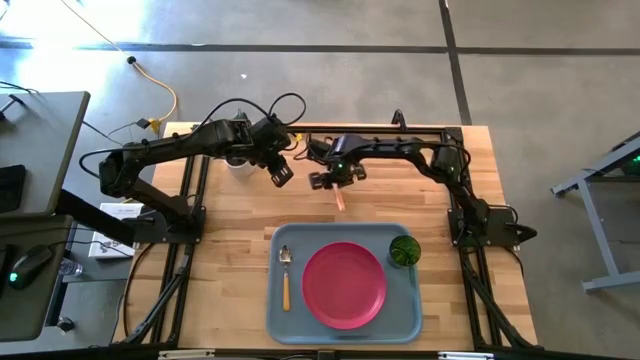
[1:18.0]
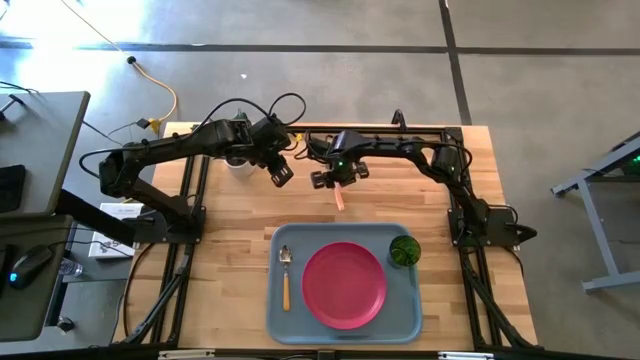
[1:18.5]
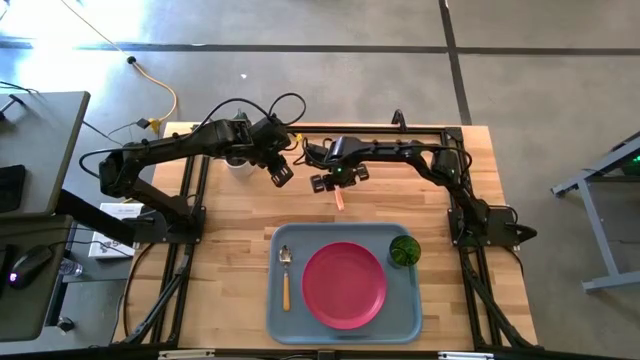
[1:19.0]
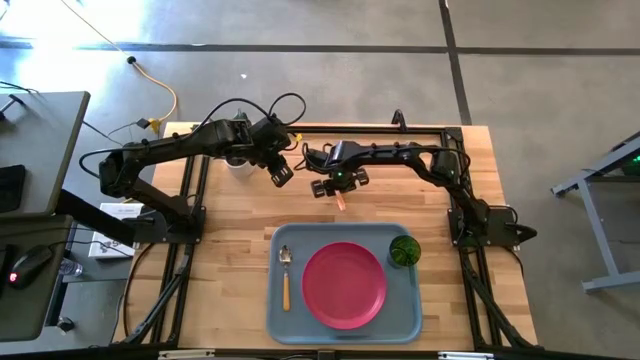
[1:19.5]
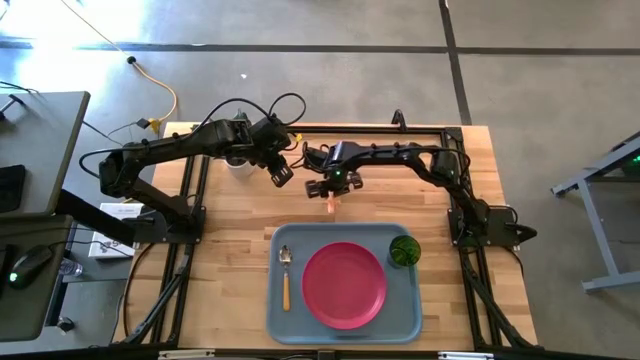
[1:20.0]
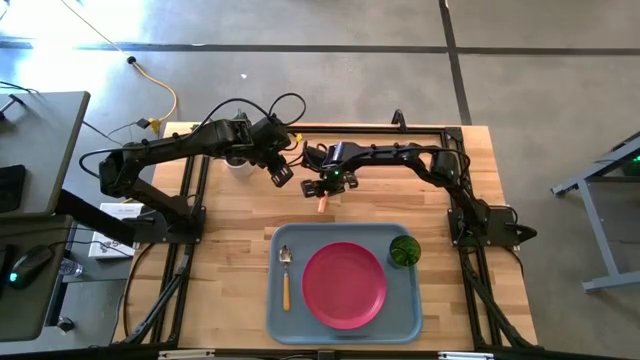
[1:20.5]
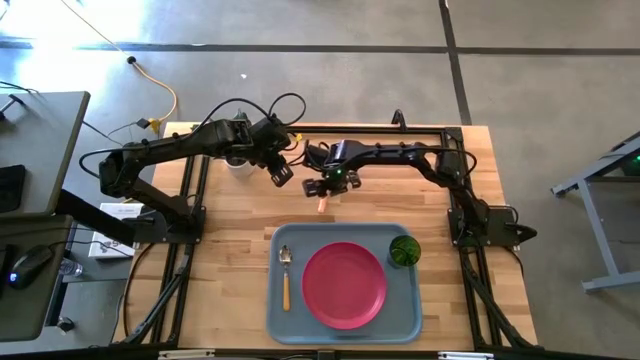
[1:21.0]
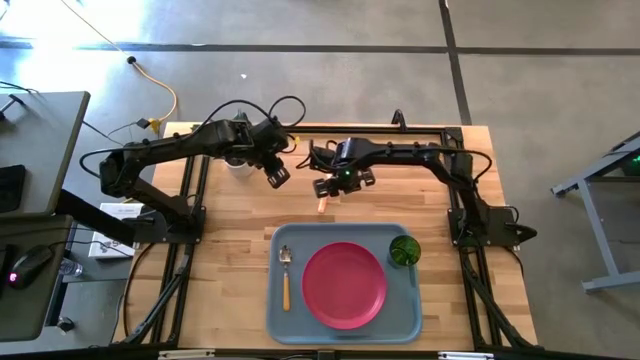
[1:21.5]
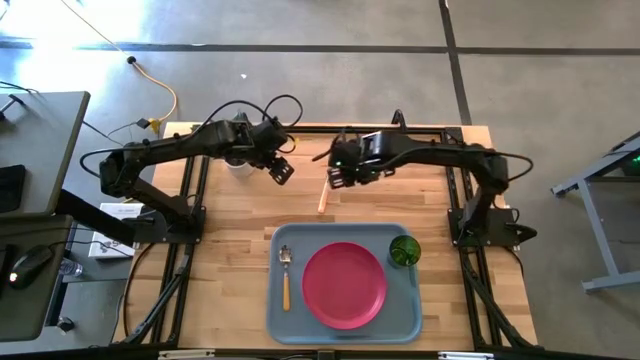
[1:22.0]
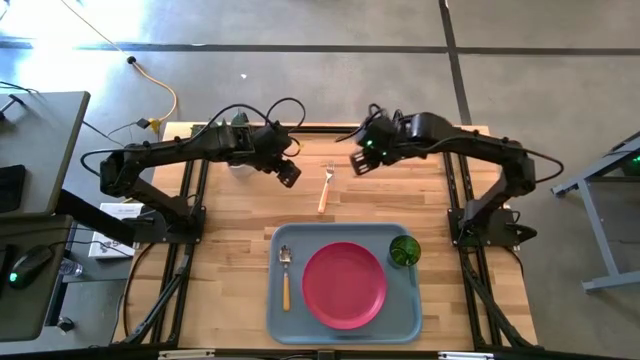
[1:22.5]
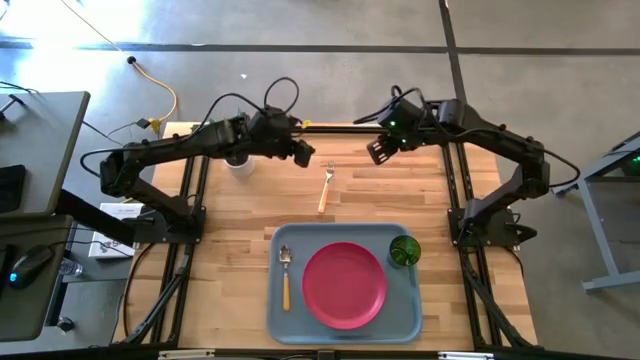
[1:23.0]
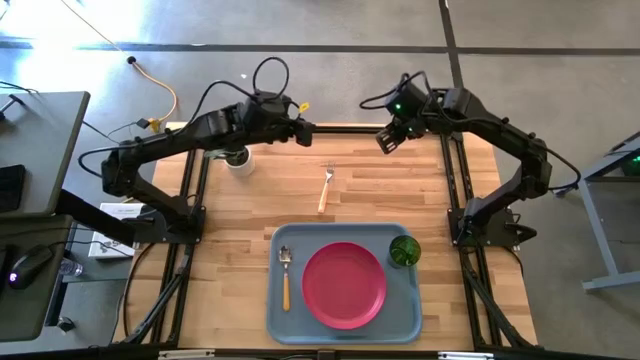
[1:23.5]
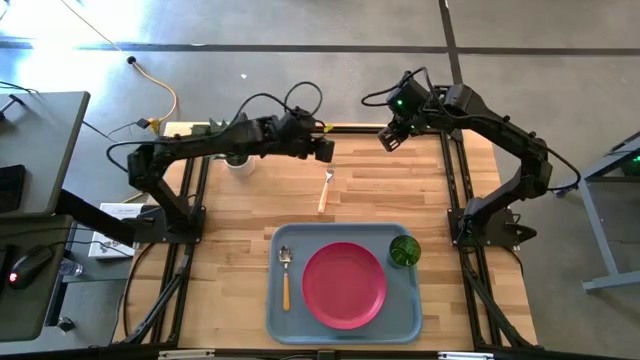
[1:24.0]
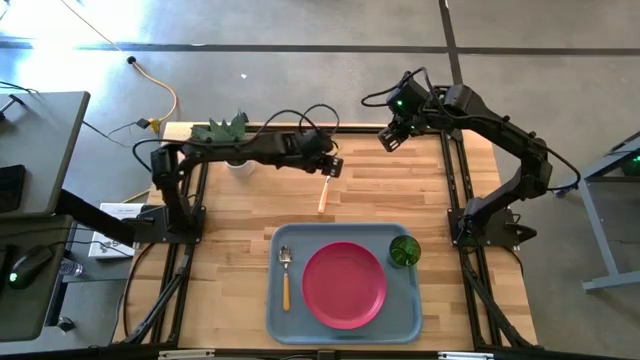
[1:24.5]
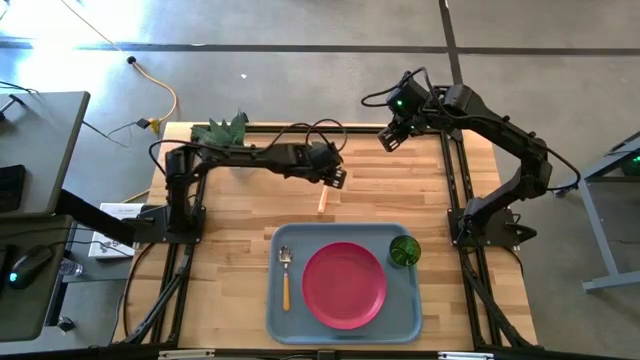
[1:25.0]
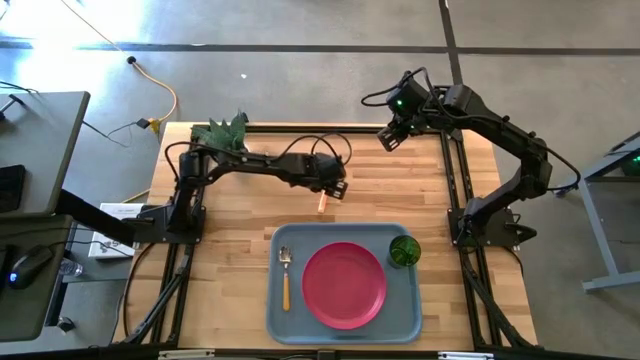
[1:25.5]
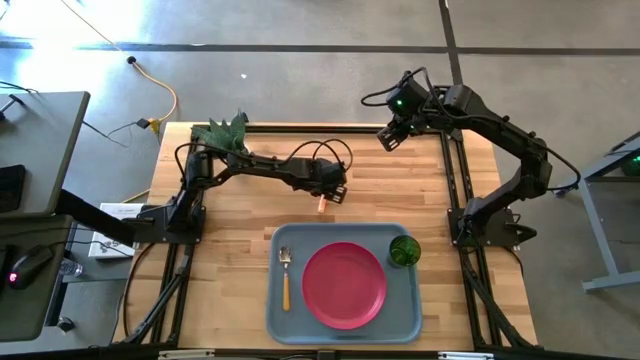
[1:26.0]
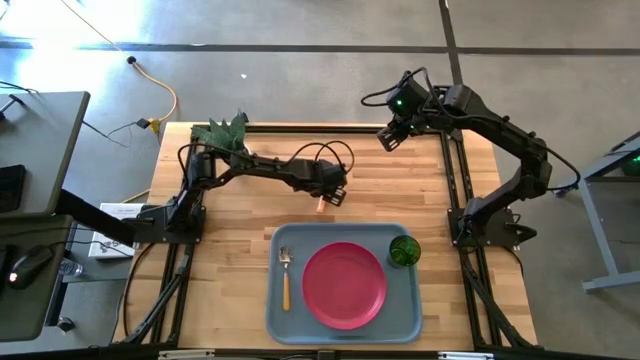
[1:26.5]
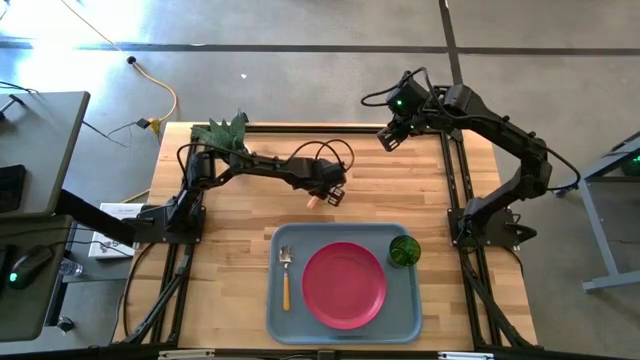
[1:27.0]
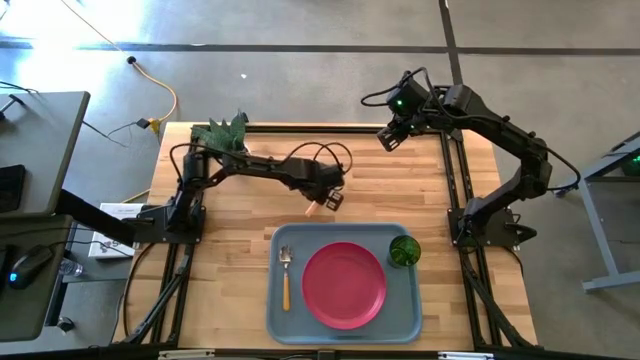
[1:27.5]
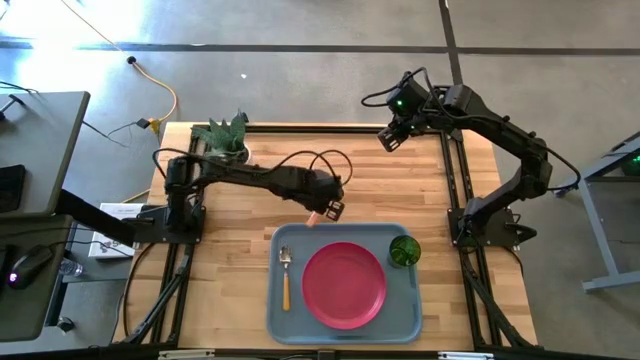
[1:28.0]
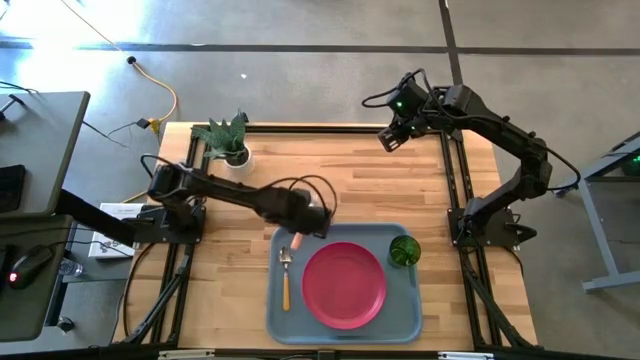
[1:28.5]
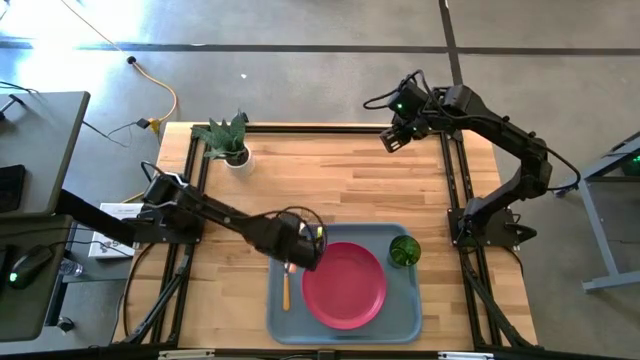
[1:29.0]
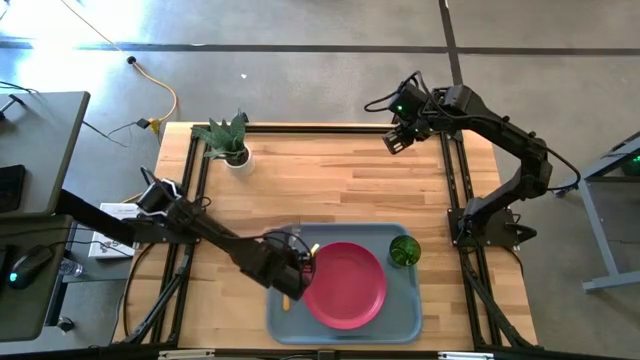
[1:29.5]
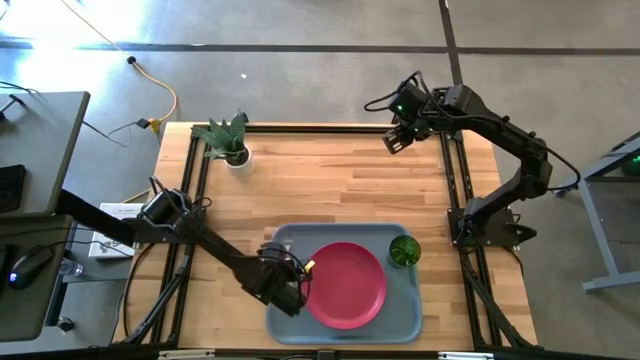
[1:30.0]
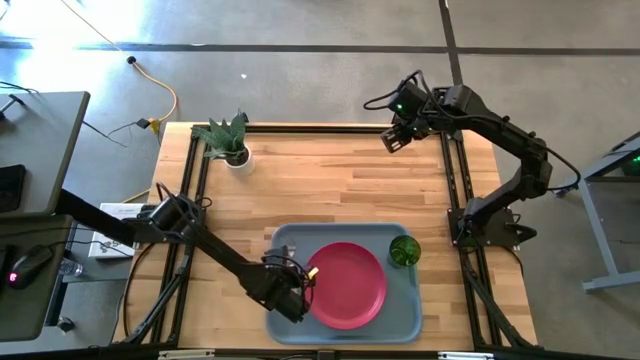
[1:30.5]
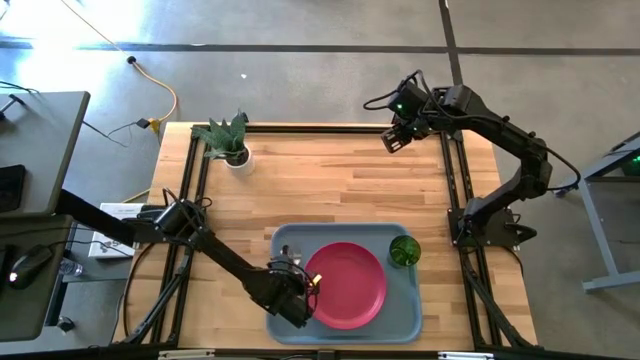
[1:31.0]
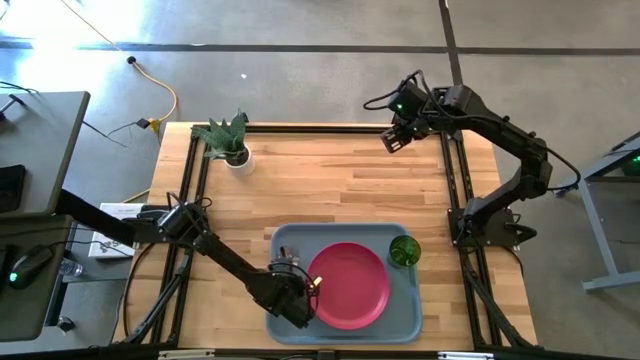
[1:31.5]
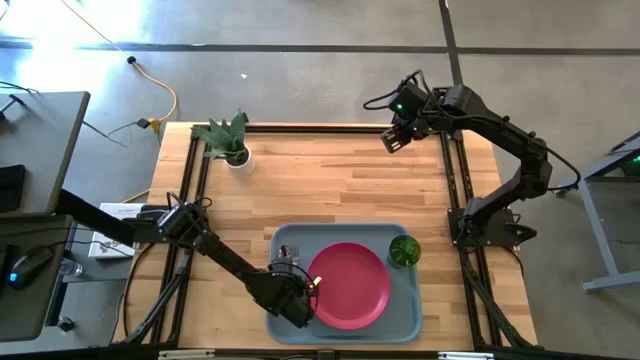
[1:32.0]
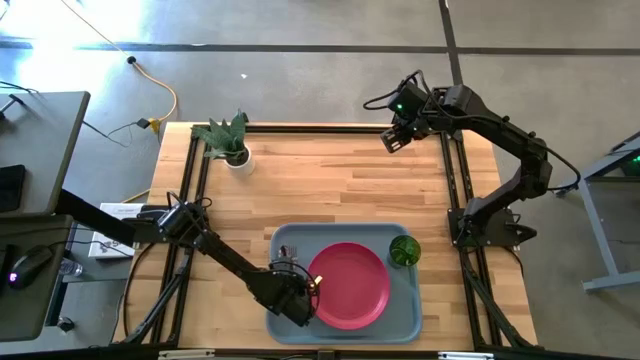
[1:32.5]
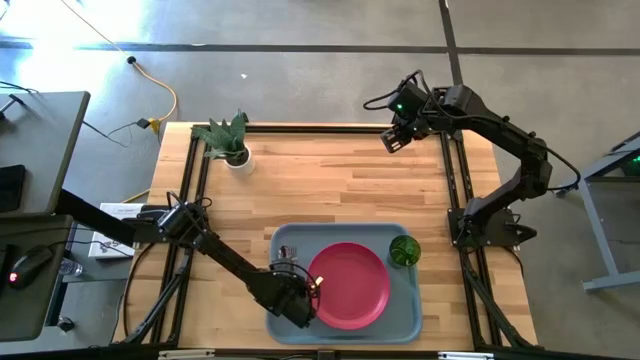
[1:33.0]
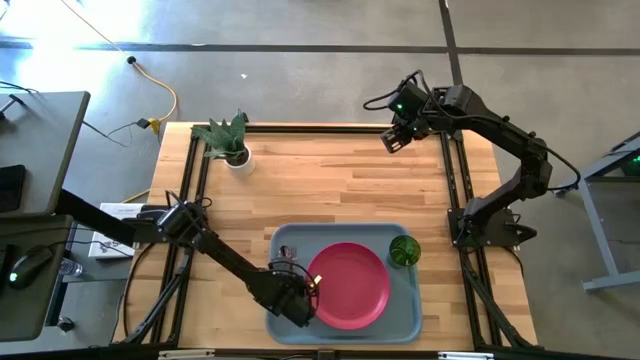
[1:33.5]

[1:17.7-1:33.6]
Task: Pick and place plate/cup/fork/spoon on tray
Put the yellow fork on the blue tray

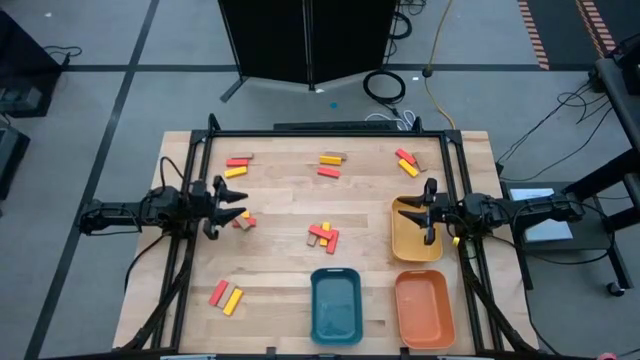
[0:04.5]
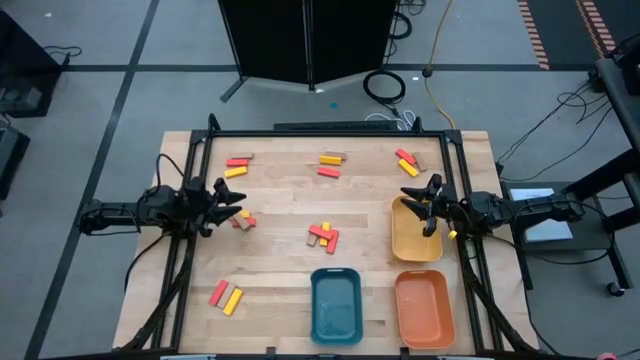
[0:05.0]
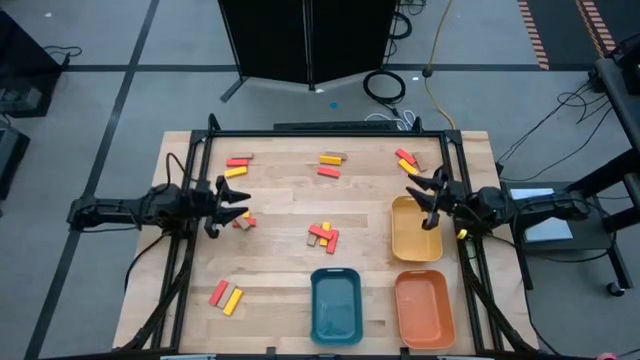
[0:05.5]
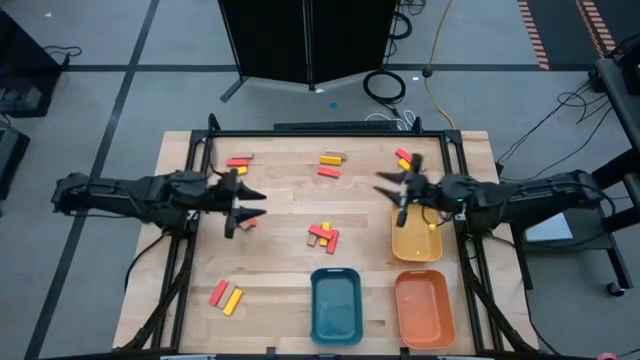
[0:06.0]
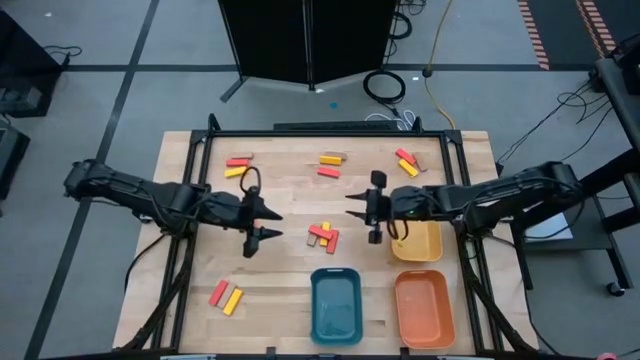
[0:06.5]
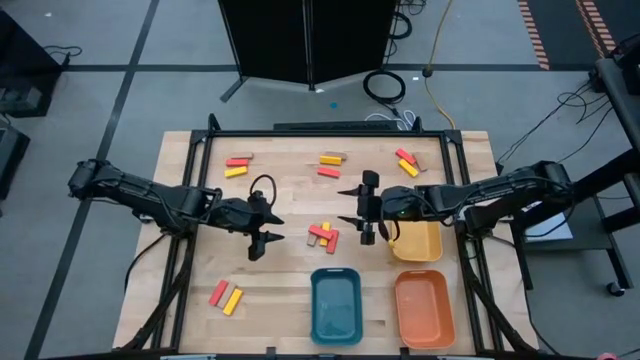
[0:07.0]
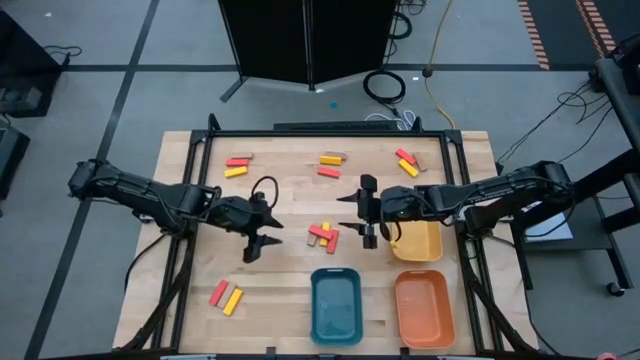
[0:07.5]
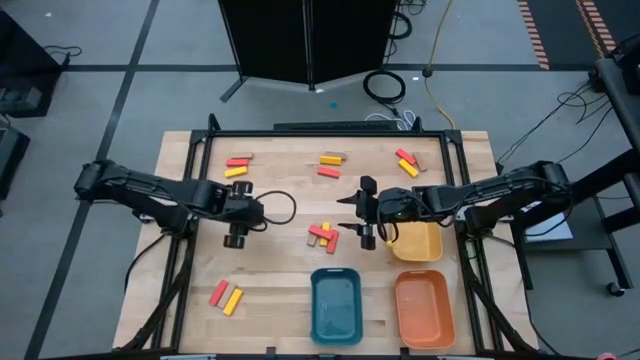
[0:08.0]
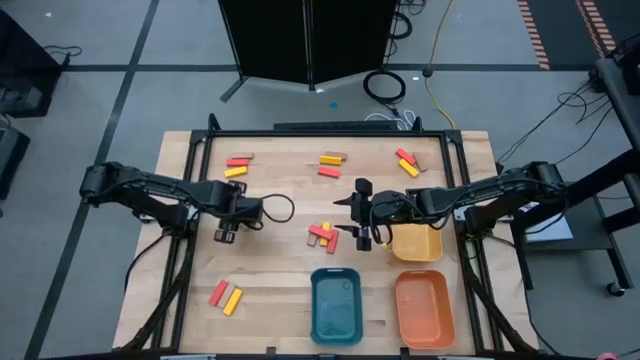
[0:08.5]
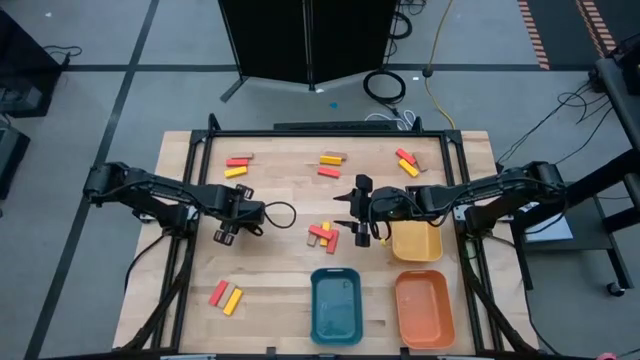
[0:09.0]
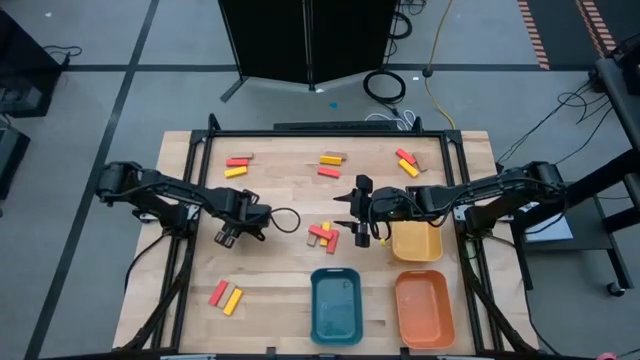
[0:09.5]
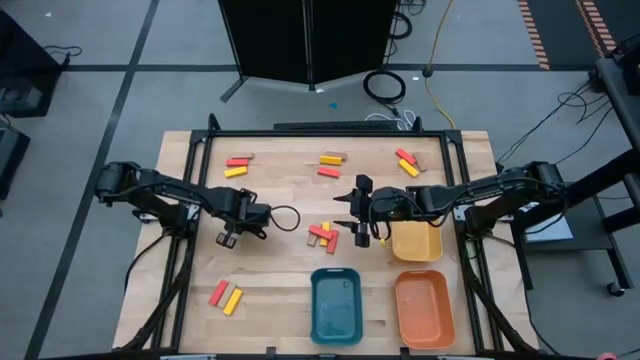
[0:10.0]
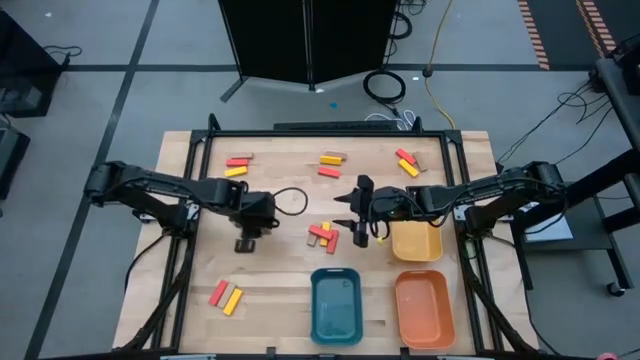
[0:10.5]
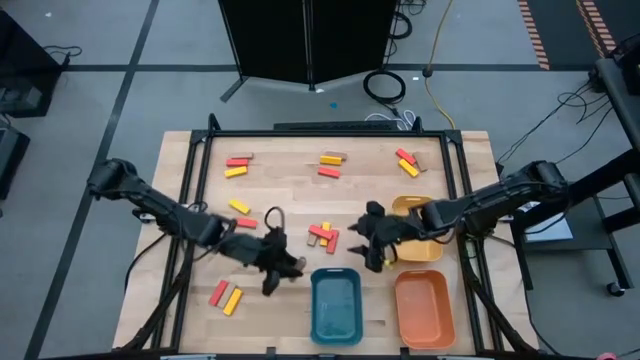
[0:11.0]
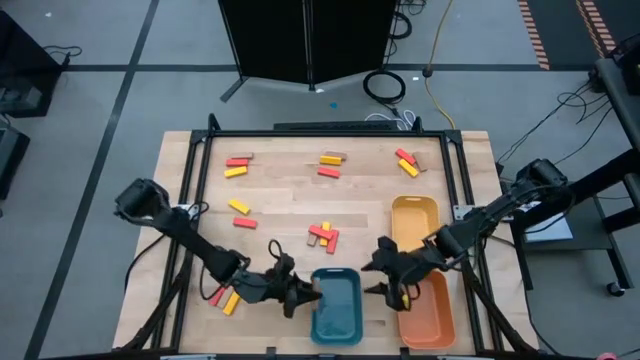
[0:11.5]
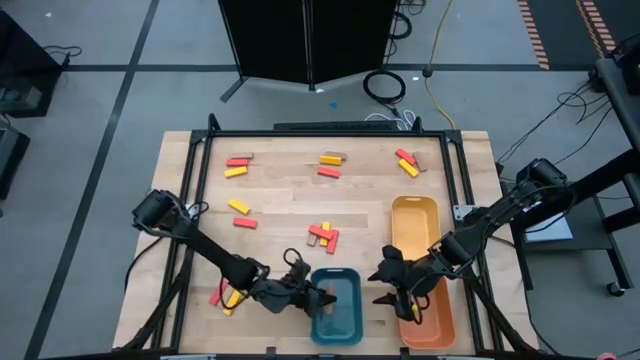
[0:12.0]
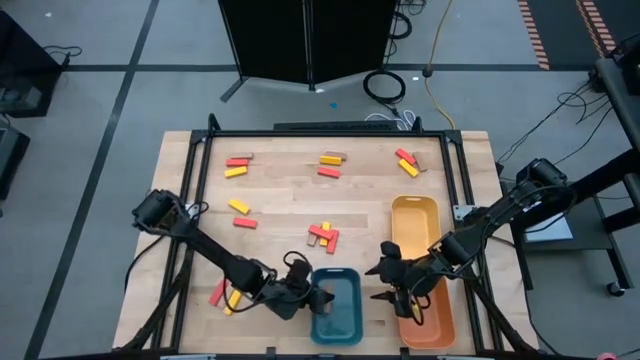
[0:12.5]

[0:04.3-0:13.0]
Task: Sort blocks
Put the brown block into the blue bin
